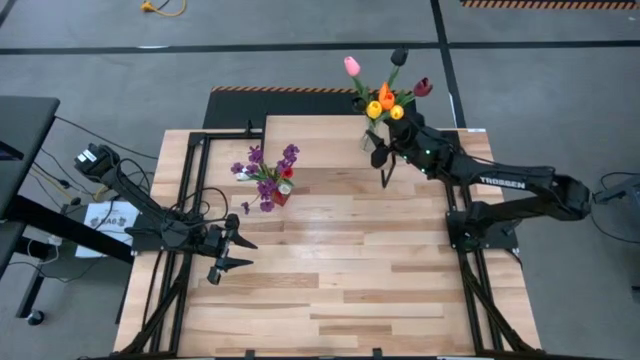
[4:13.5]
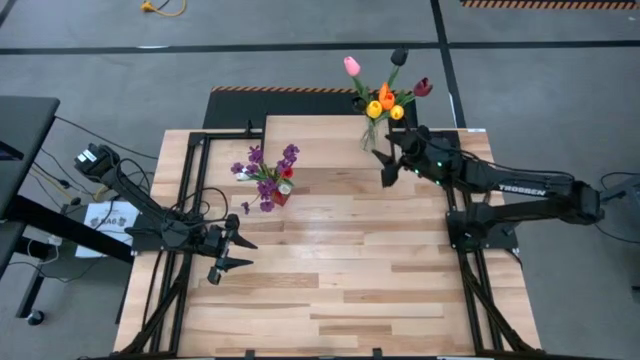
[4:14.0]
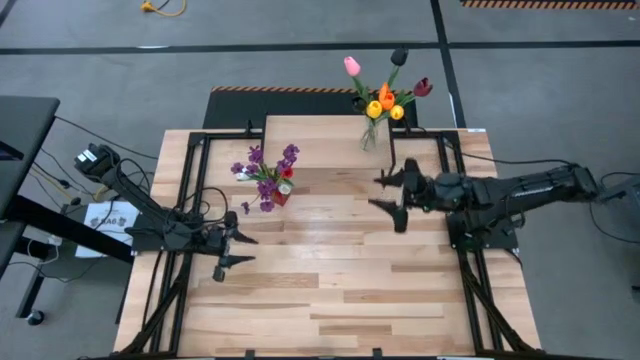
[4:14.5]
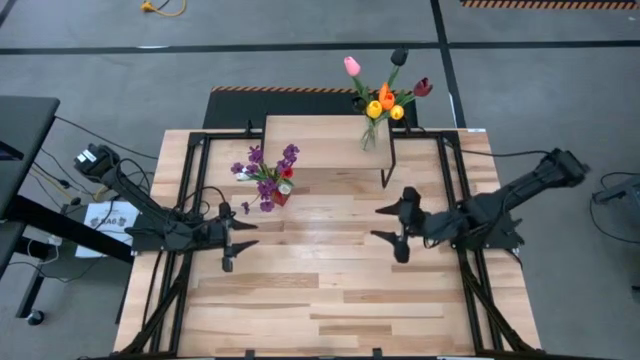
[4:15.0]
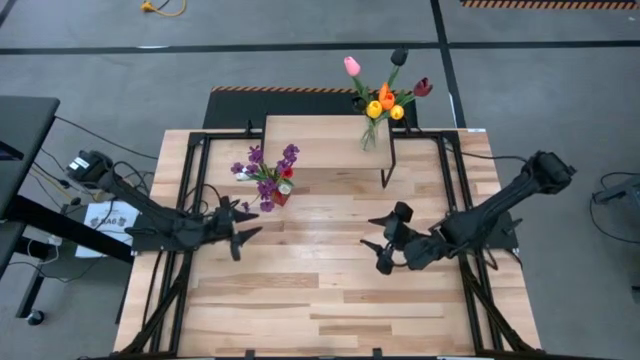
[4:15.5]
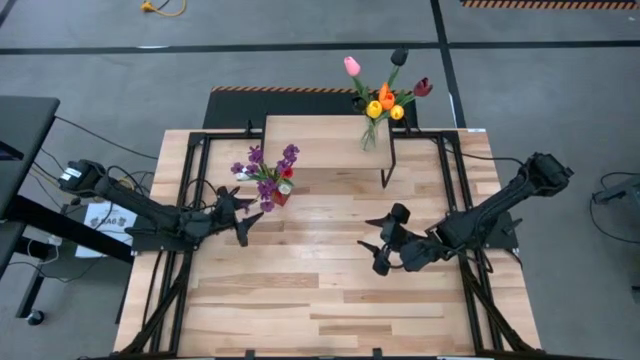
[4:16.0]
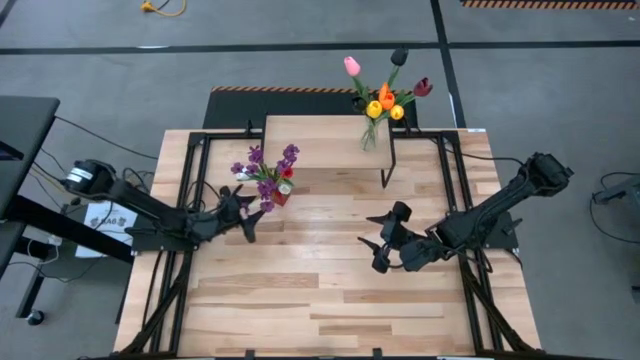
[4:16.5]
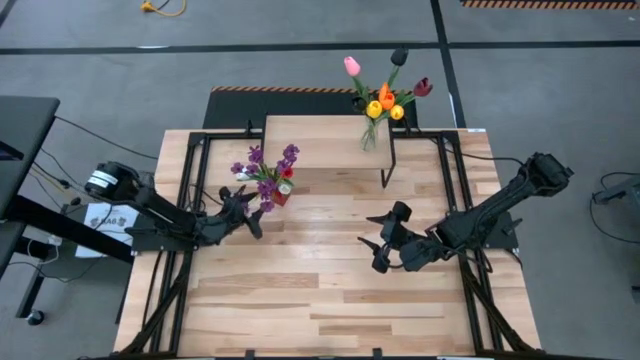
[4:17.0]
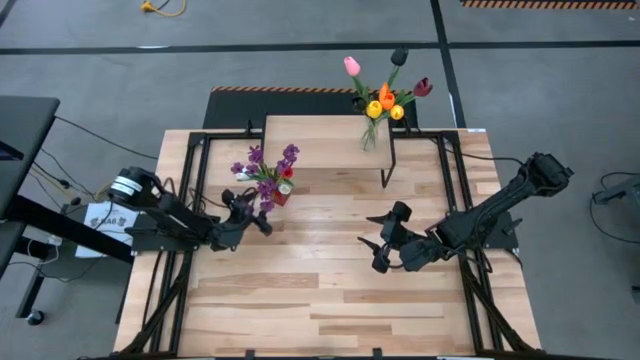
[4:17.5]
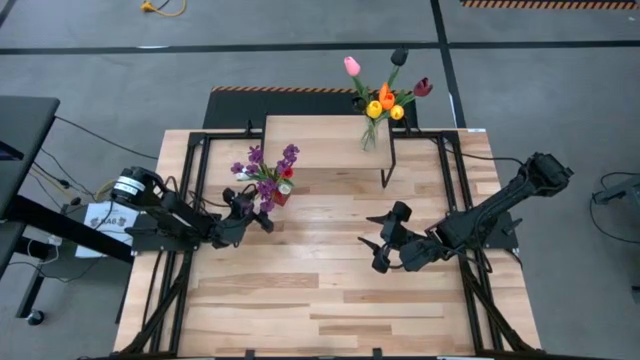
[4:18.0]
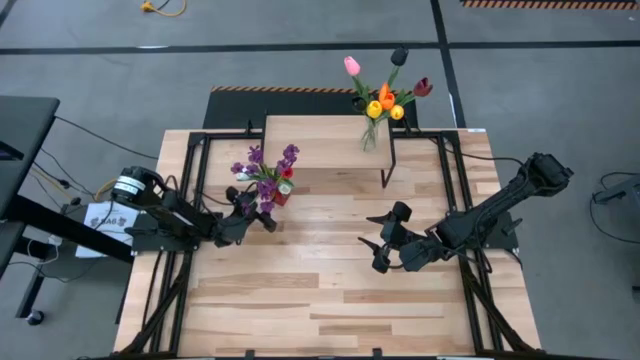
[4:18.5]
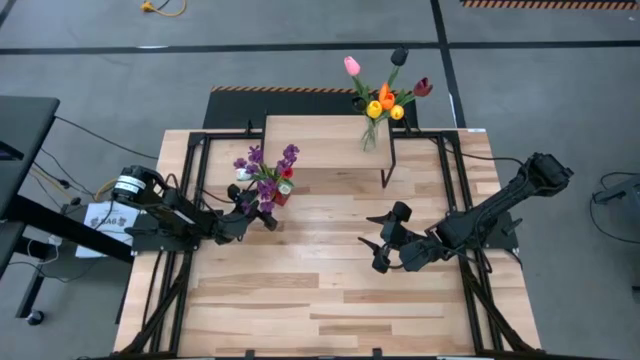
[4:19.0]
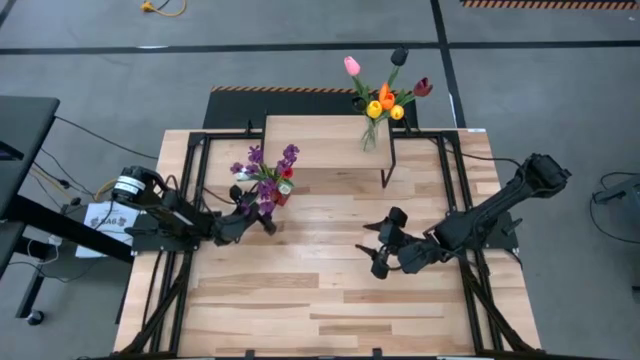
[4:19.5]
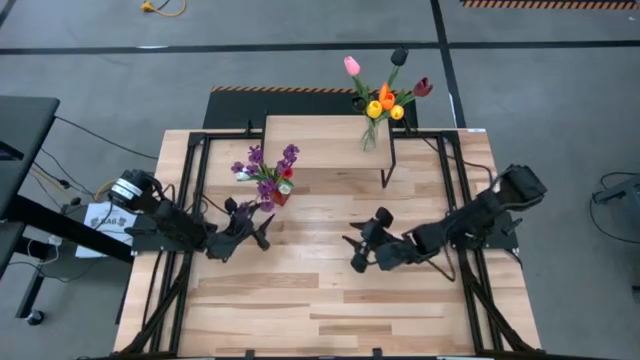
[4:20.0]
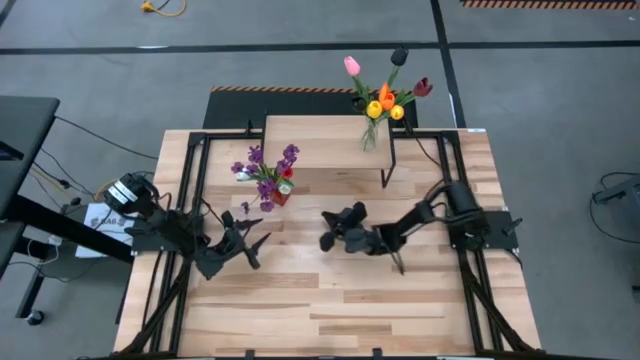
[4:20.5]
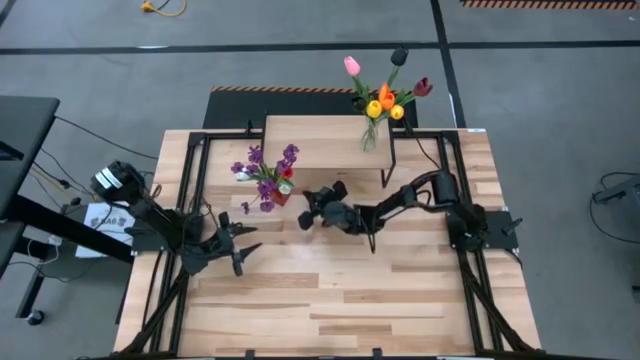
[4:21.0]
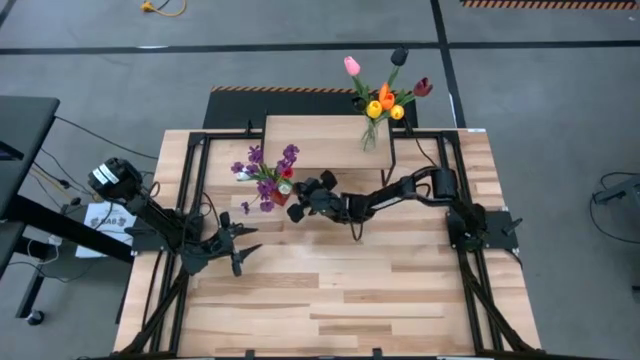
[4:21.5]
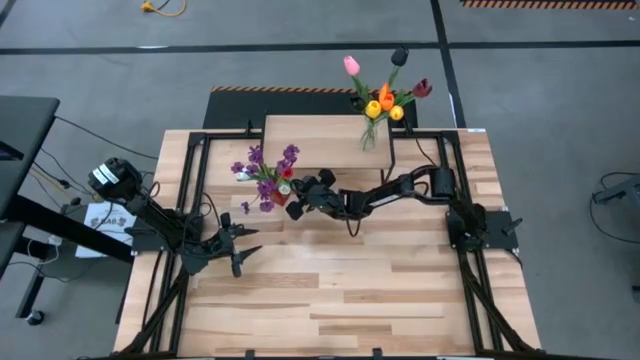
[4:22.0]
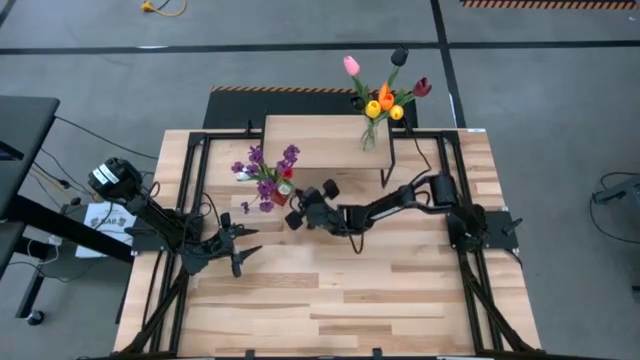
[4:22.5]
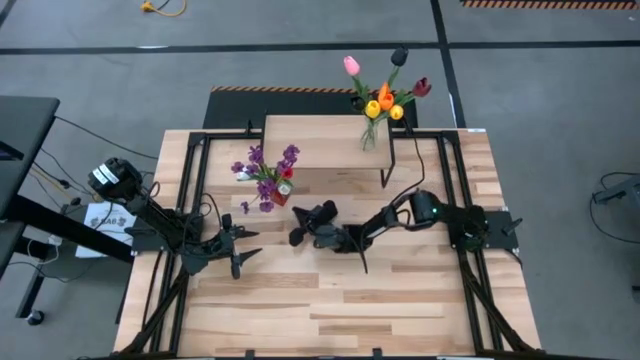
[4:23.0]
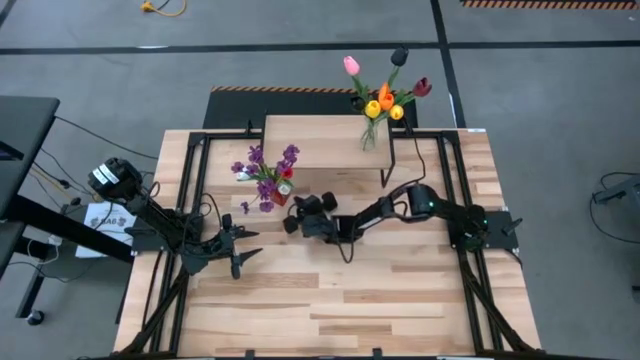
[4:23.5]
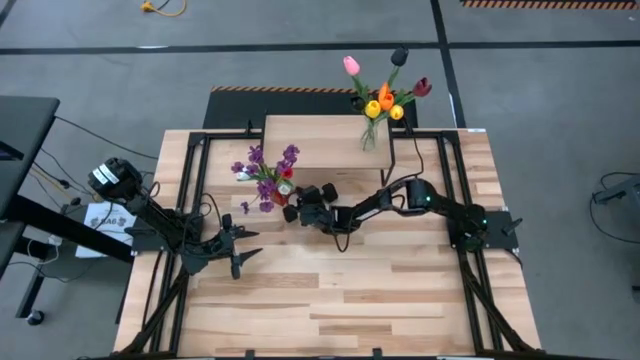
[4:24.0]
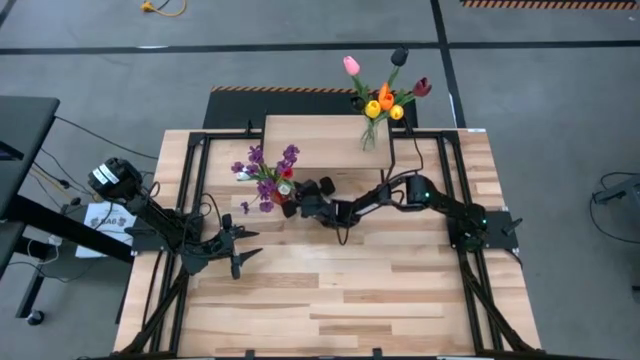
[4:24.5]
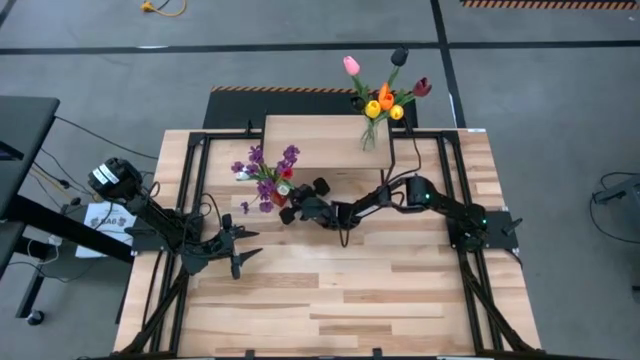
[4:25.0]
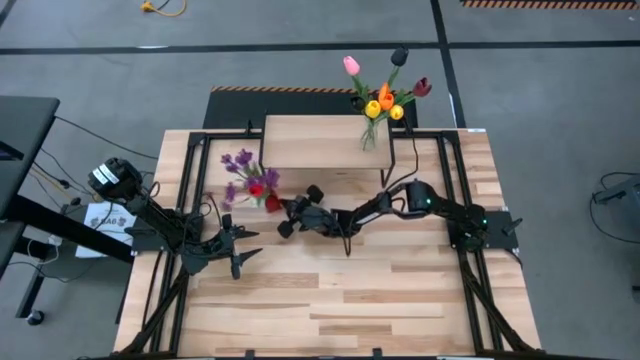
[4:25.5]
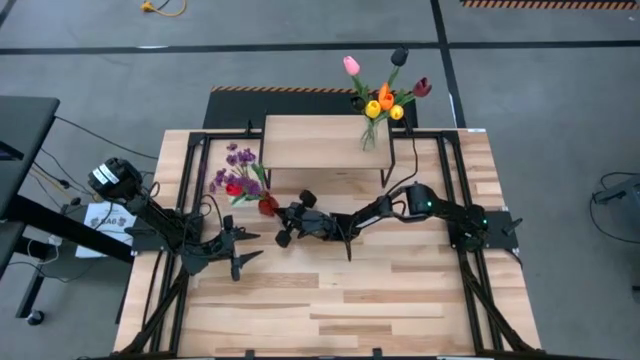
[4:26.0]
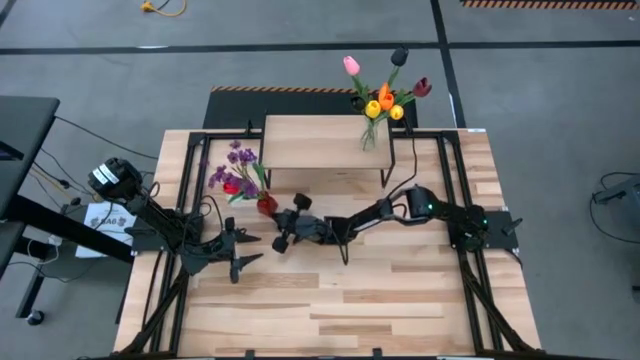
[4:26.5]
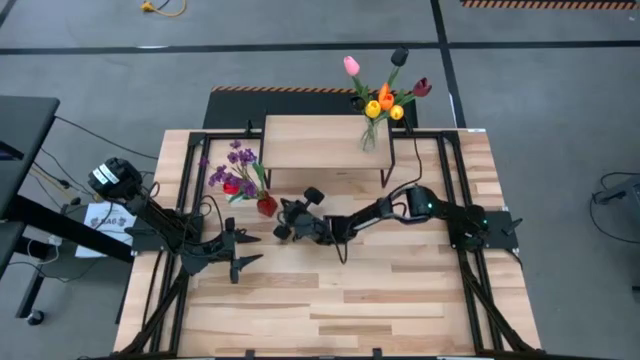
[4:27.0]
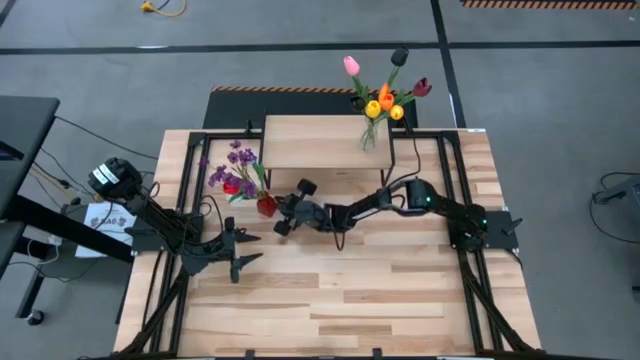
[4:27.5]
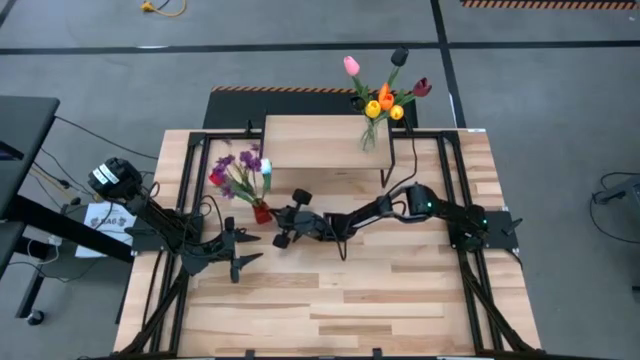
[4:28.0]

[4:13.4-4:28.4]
Task: Pick and place flowers into a vace then onto a shelf
Put the red flower vase on the shelf

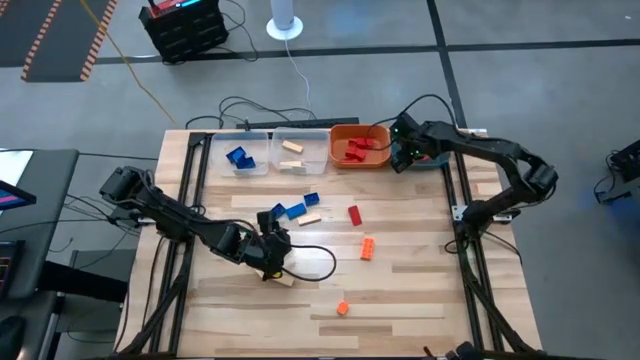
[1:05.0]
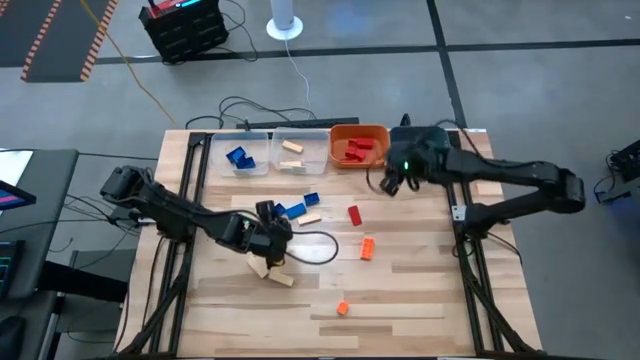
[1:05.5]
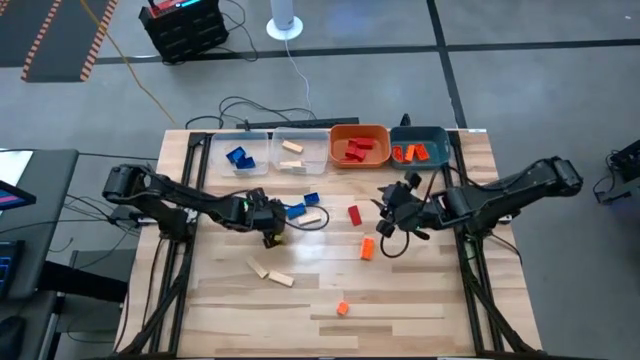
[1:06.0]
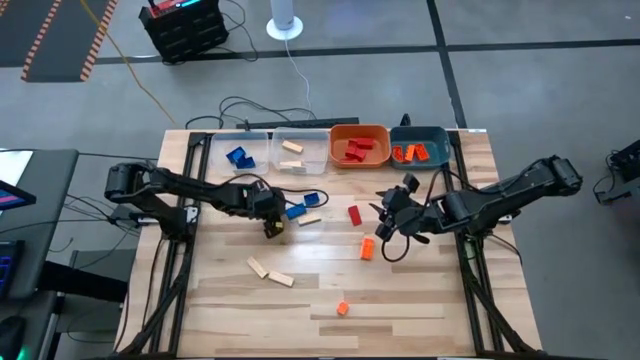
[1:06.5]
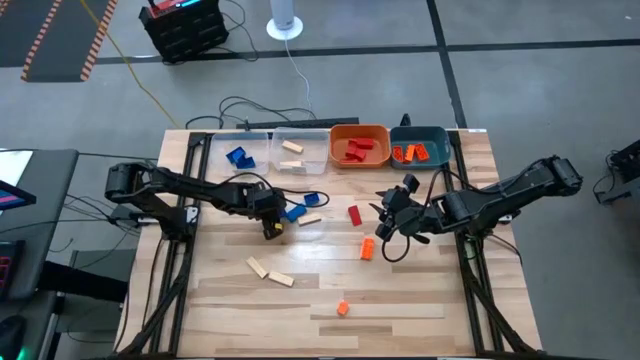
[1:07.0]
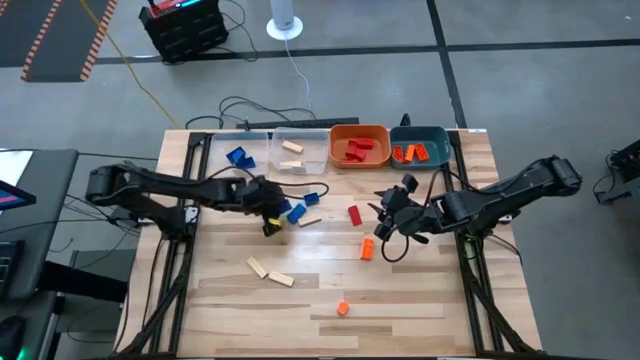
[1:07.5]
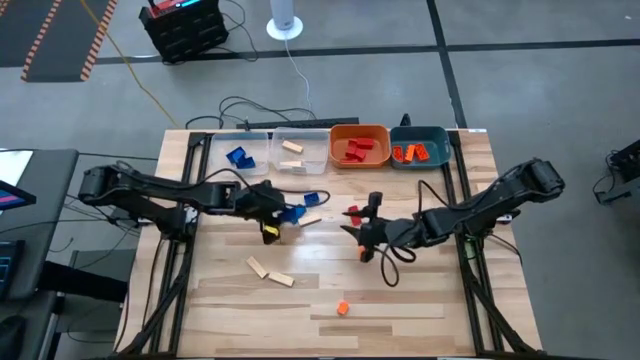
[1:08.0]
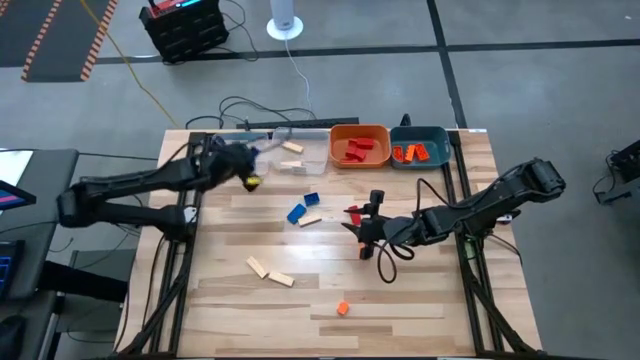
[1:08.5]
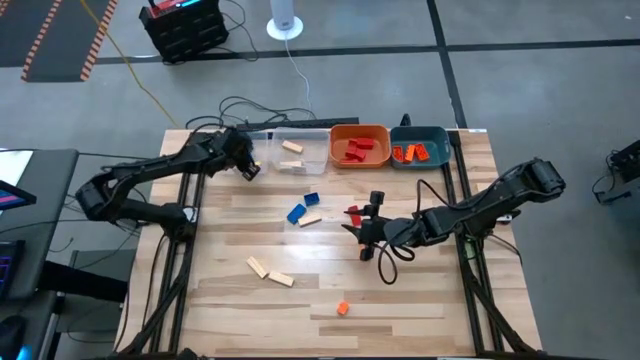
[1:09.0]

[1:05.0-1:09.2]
Task: Sort blocks
Put the blue game piece into the left transparent bin

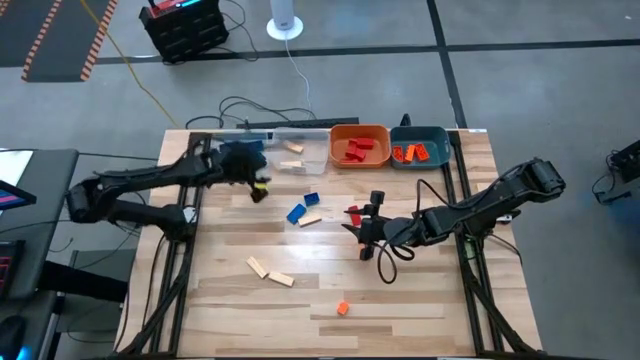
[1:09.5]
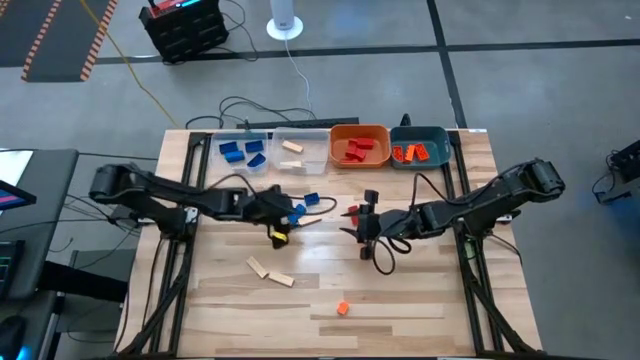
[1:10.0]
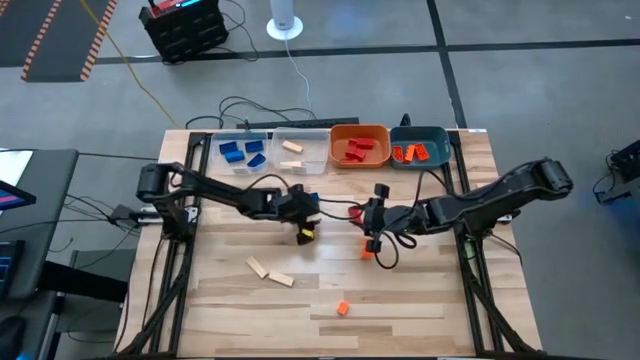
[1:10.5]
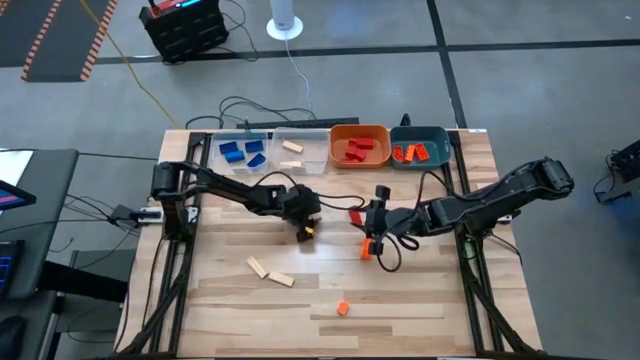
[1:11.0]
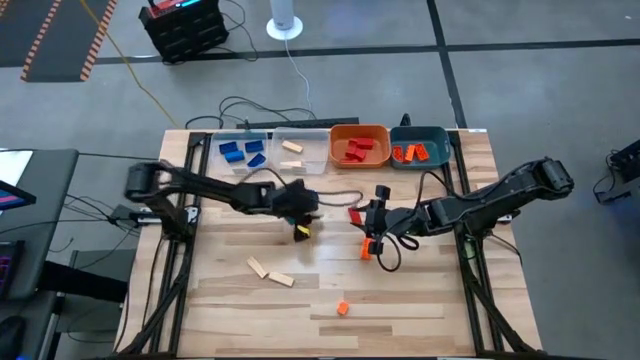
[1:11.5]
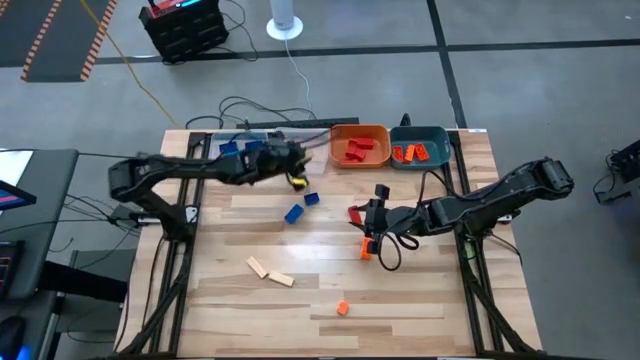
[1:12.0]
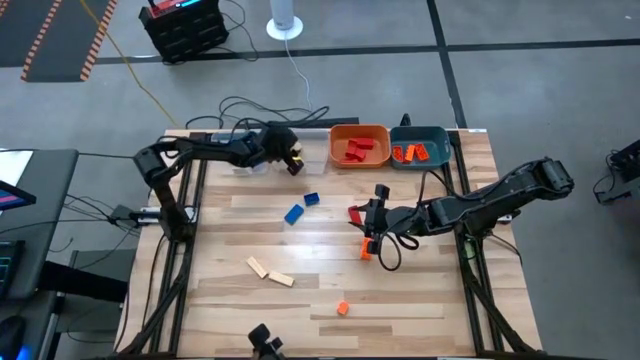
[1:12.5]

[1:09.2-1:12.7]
Put the brown block into the right transparent bin
